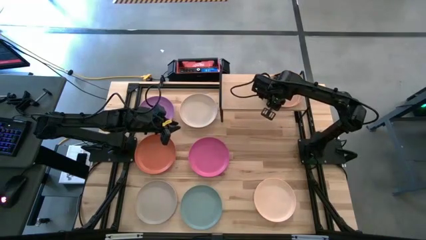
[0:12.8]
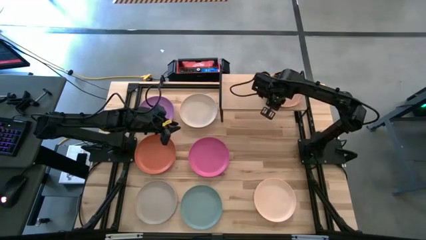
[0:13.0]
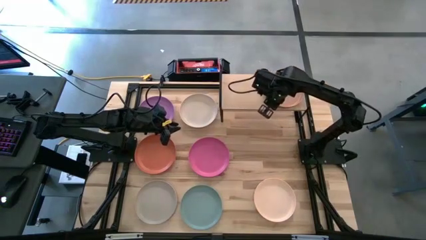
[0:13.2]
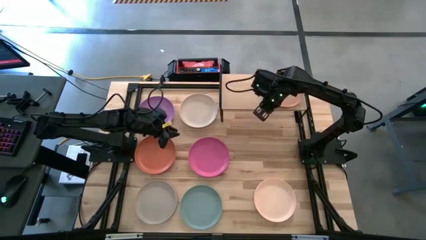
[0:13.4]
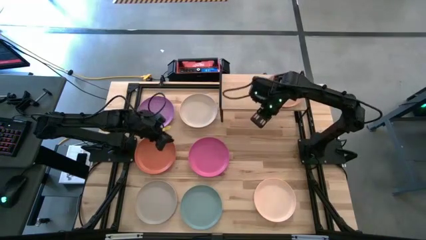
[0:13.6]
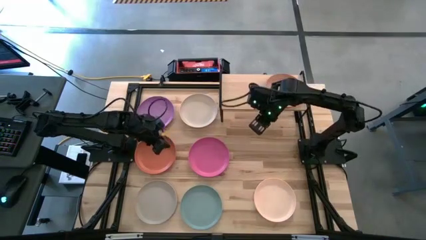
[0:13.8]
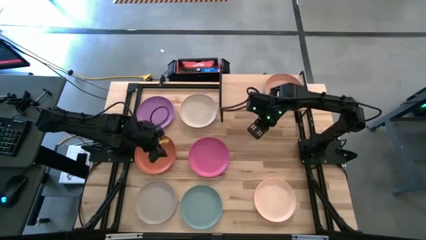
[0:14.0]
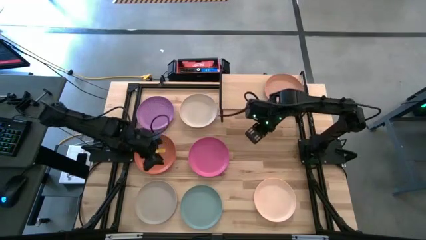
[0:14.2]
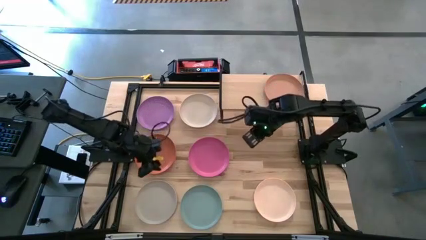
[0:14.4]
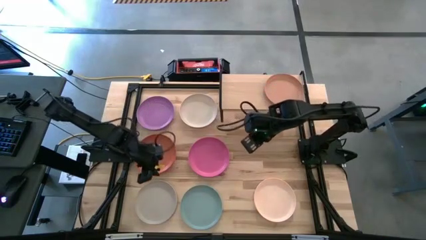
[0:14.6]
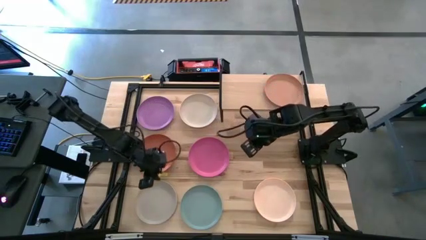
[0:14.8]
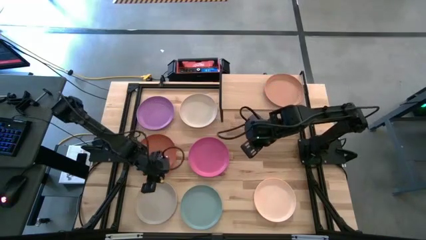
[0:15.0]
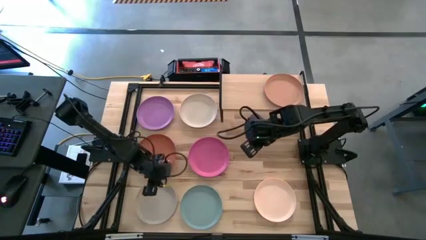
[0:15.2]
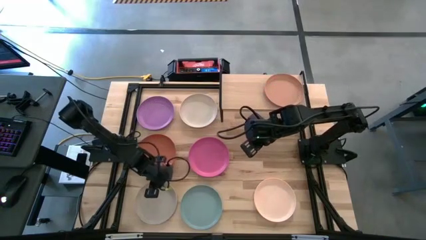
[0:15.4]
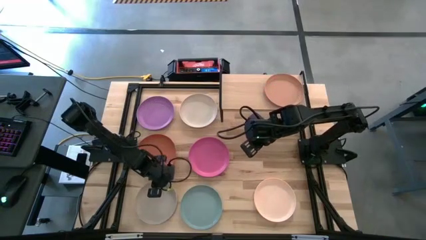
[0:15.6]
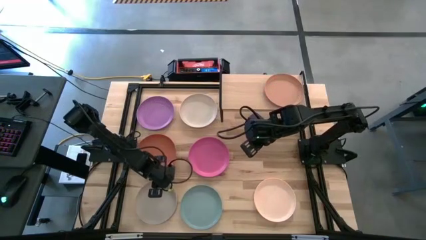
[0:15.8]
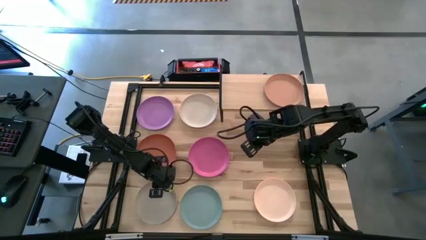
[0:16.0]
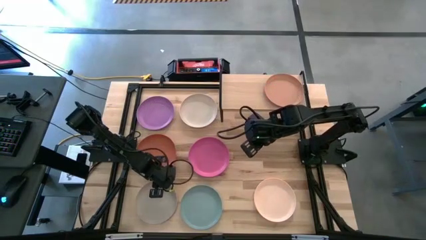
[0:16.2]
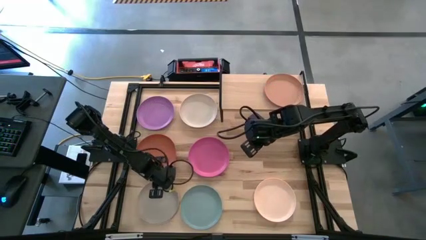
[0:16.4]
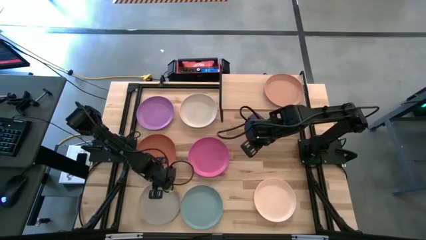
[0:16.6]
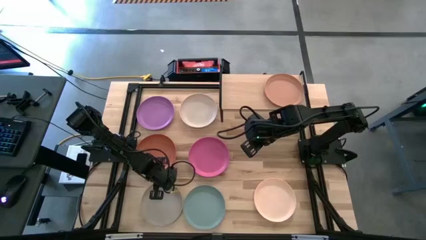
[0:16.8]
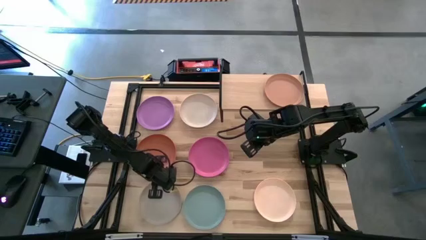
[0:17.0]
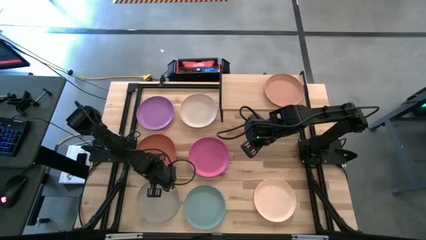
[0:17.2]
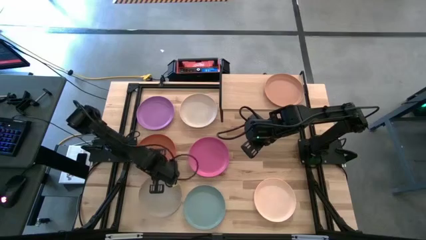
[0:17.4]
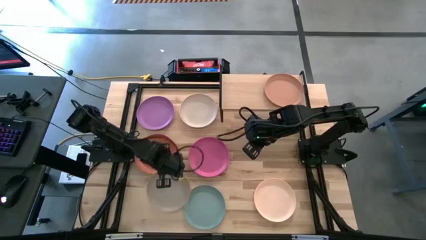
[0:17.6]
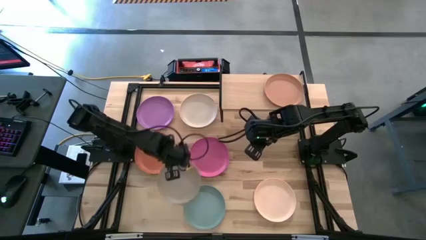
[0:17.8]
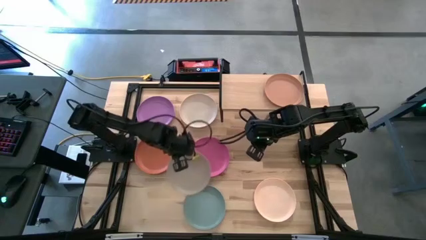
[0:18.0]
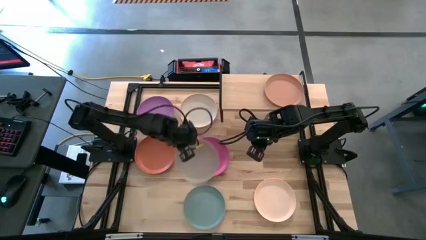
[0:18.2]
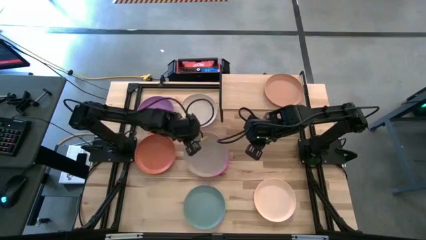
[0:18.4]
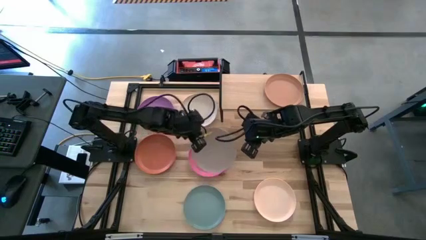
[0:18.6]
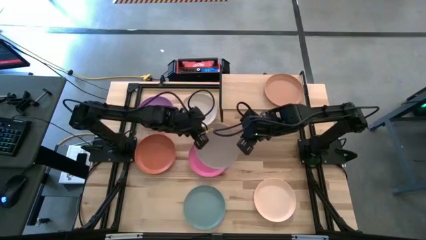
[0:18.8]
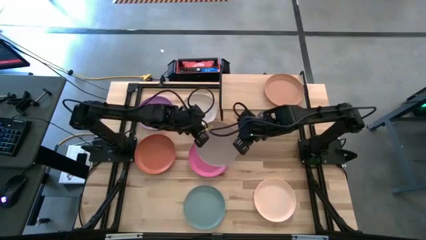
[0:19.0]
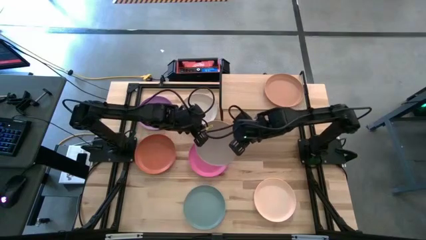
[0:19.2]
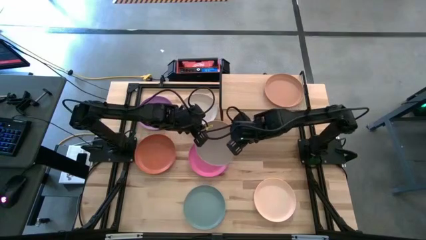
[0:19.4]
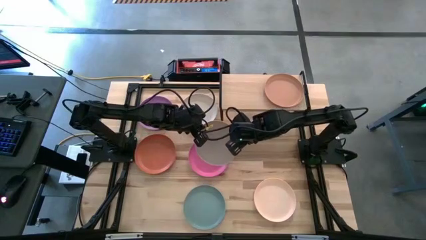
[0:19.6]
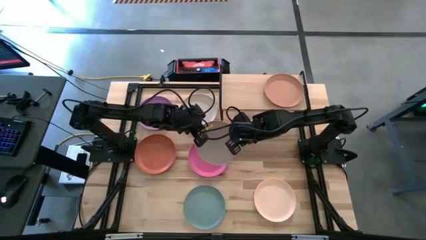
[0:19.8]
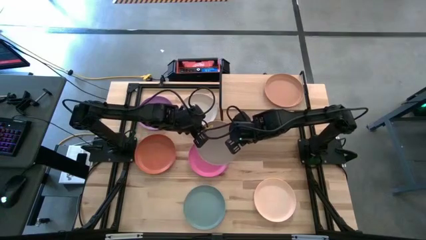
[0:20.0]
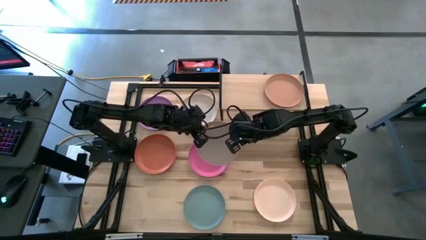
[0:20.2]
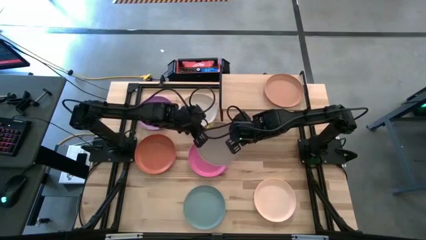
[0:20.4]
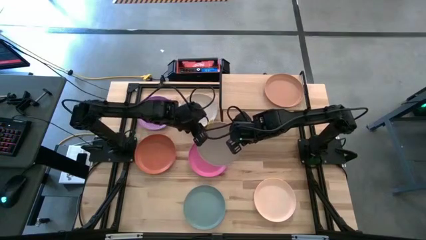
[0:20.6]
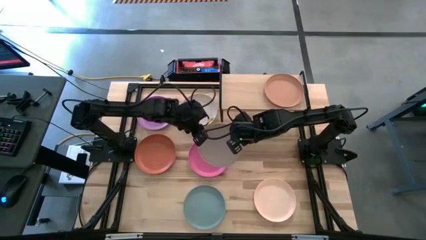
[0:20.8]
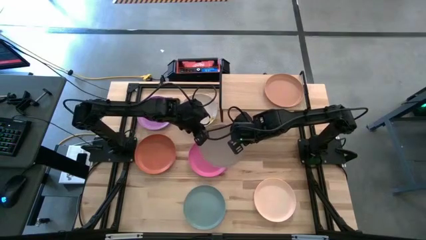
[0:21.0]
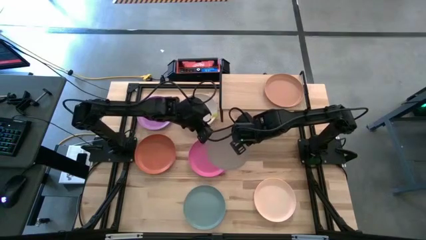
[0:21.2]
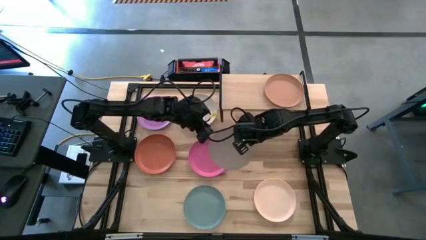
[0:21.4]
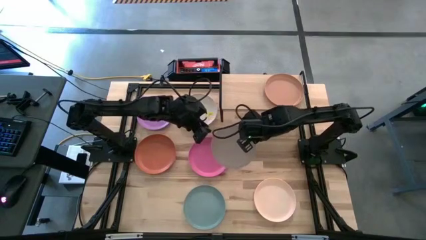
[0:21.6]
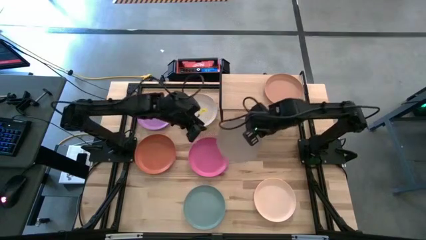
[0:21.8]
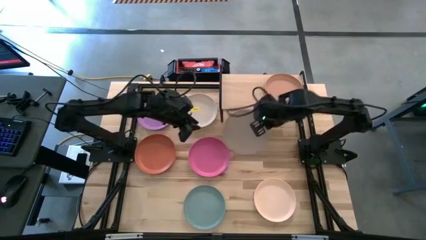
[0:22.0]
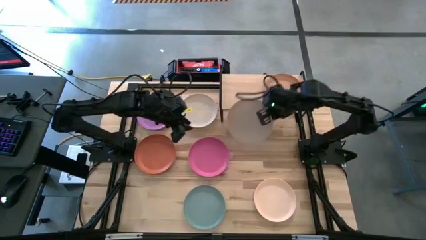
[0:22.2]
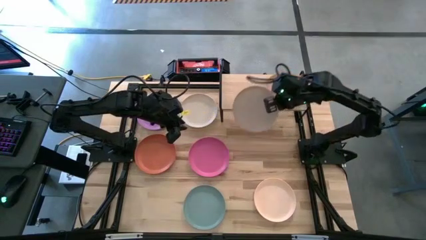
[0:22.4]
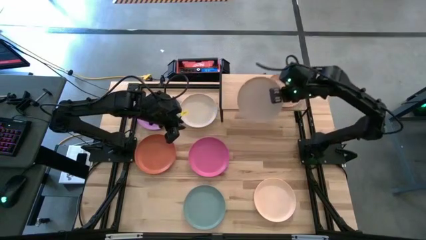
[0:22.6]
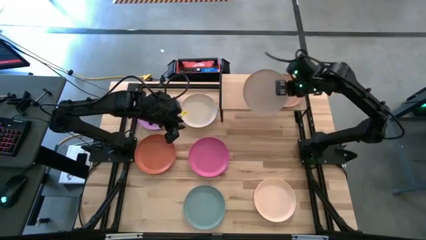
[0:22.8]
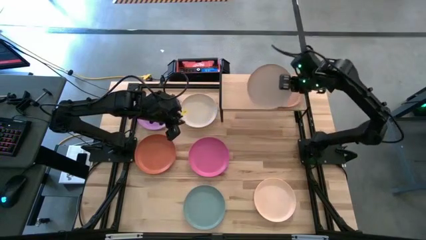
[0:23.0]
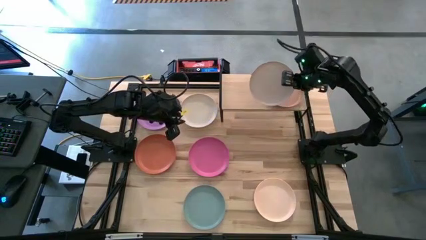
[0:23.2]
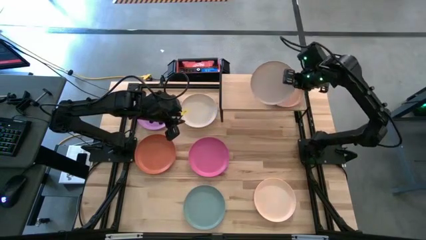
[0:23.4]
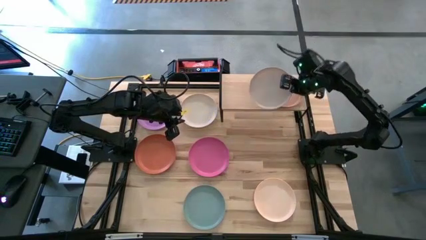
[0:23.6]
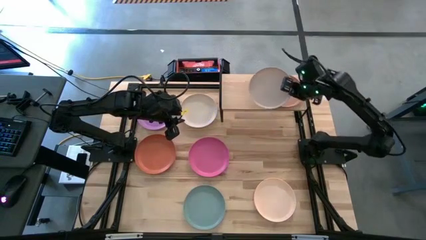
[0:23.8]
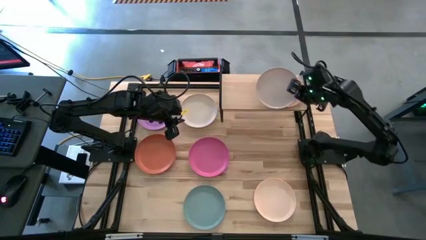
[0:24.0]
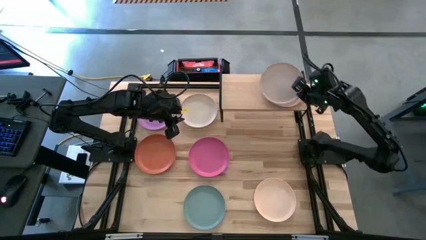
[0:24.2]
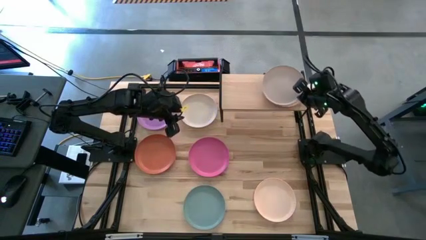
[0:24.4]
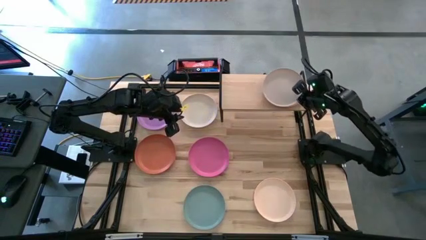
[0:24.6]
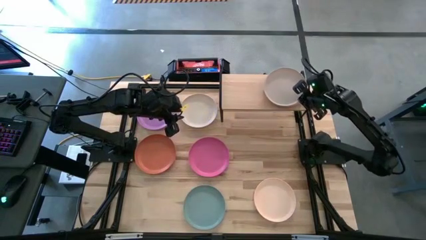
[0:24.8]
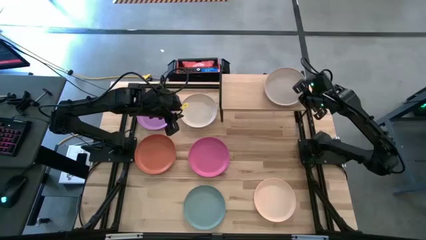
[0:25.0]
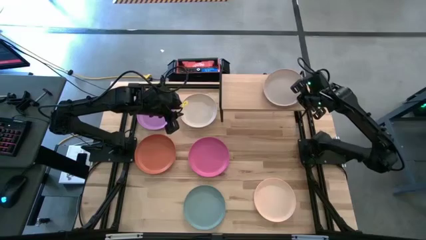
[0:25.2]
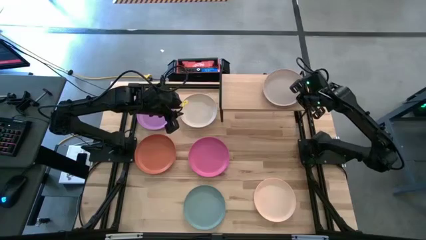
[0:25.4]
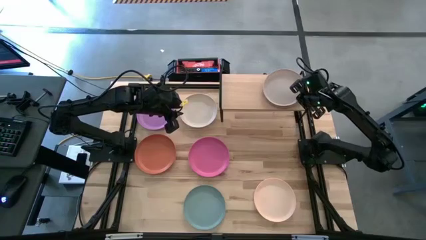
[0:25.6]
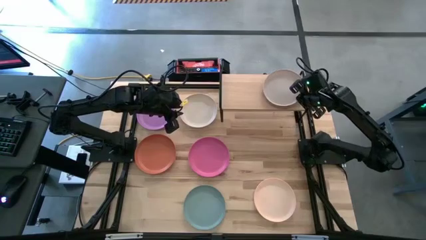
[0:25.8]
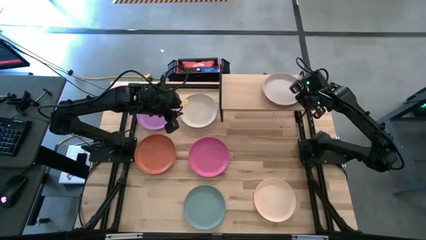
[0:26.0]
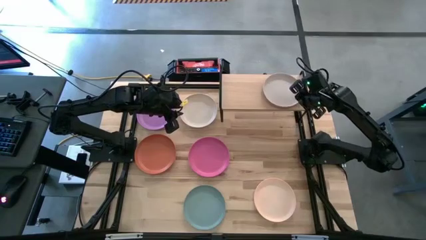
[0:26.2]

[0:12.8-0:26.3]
Task: Place and stack plates onto a shelf
Stack the gray plate on top of the light orange plate on the shelf
